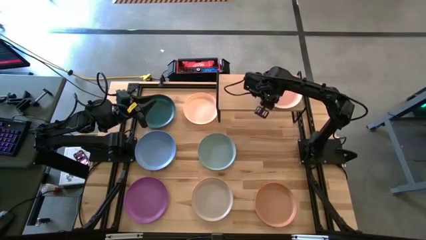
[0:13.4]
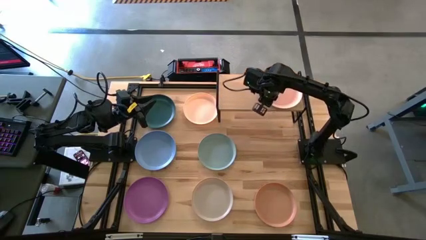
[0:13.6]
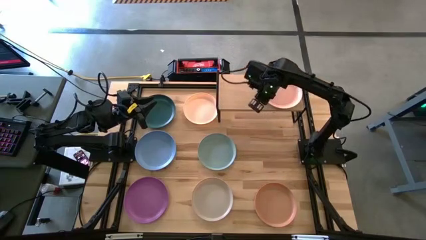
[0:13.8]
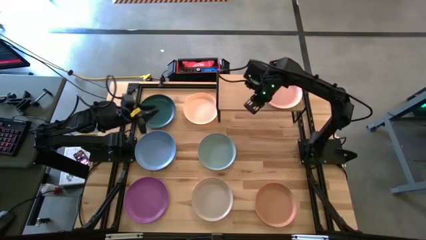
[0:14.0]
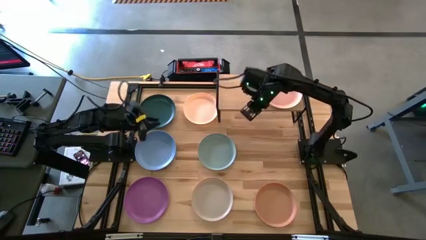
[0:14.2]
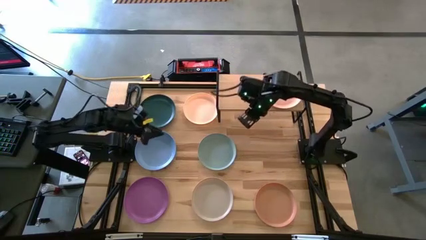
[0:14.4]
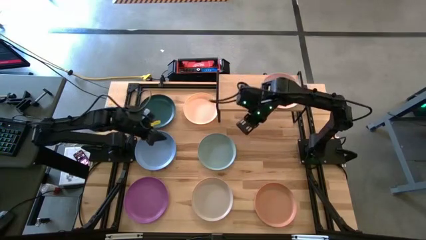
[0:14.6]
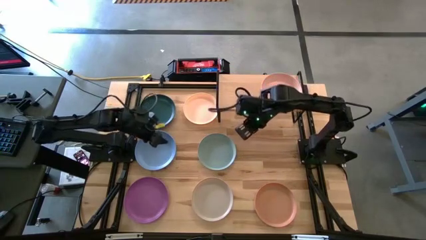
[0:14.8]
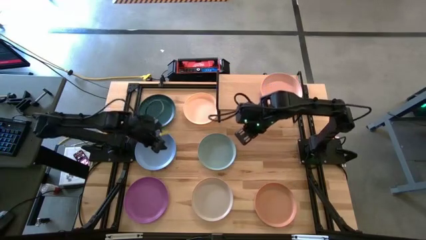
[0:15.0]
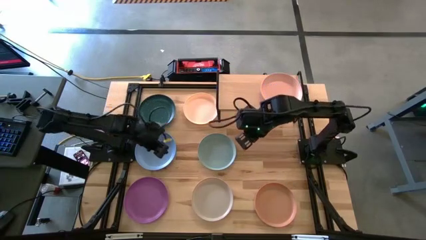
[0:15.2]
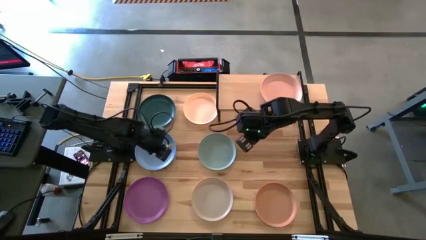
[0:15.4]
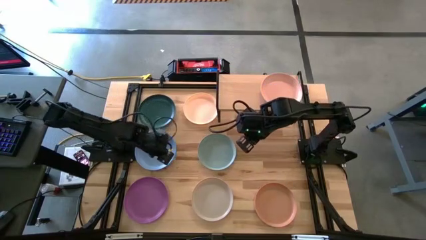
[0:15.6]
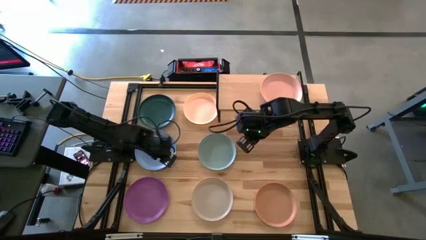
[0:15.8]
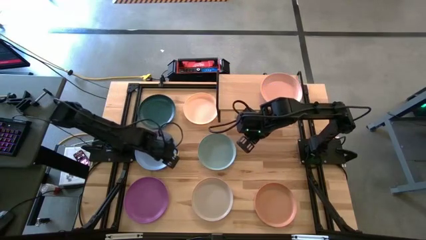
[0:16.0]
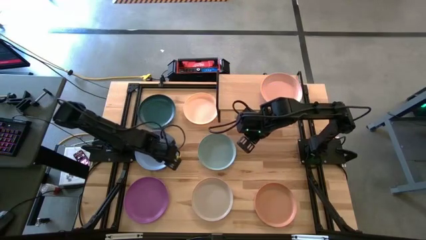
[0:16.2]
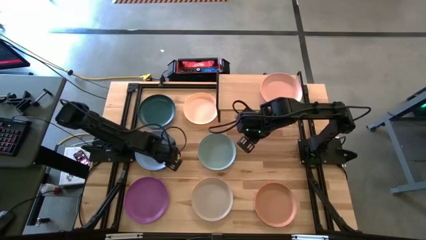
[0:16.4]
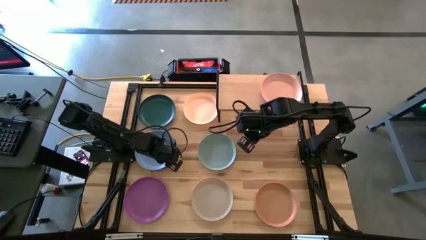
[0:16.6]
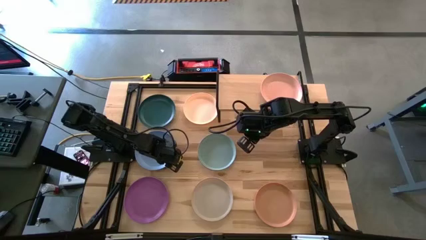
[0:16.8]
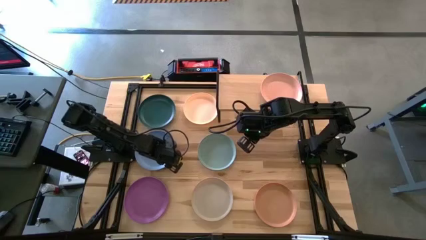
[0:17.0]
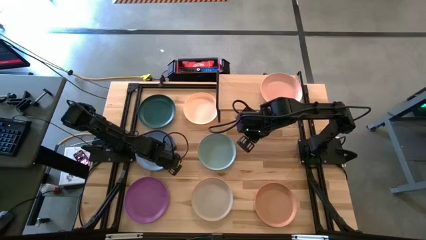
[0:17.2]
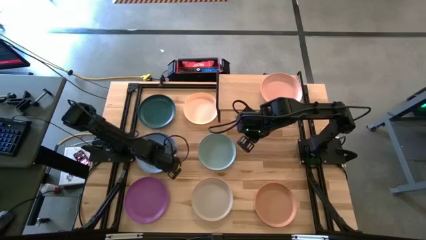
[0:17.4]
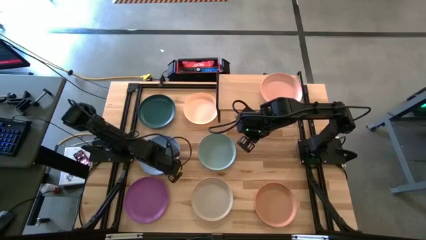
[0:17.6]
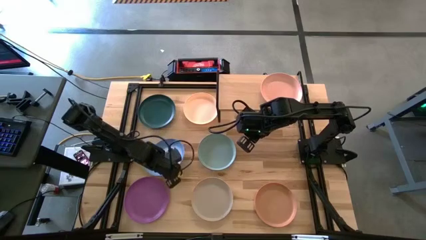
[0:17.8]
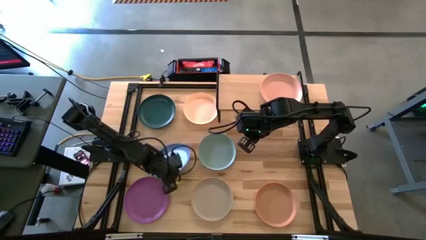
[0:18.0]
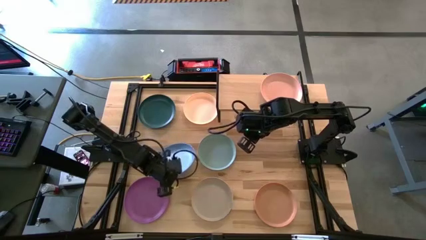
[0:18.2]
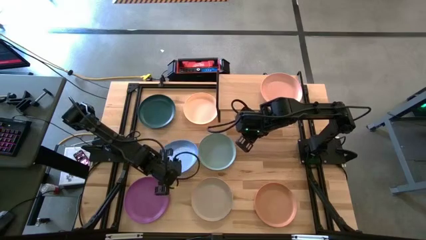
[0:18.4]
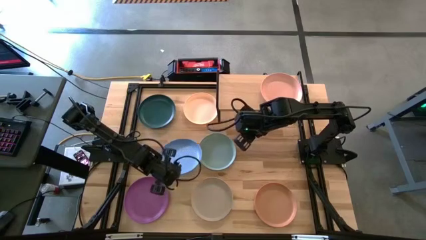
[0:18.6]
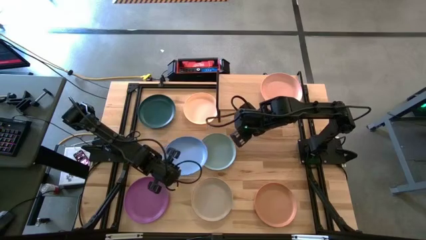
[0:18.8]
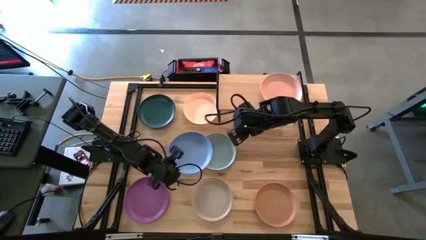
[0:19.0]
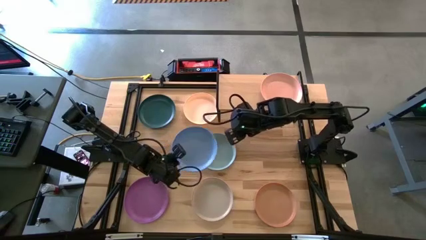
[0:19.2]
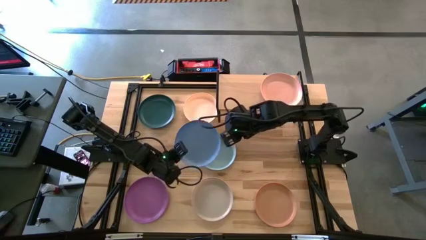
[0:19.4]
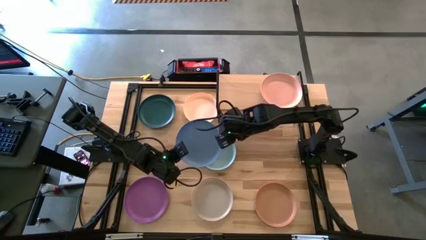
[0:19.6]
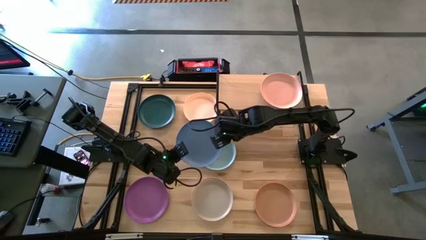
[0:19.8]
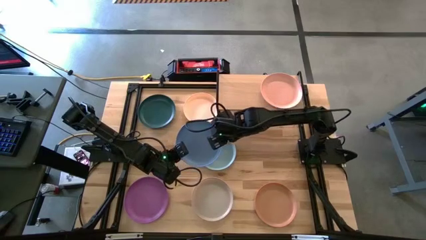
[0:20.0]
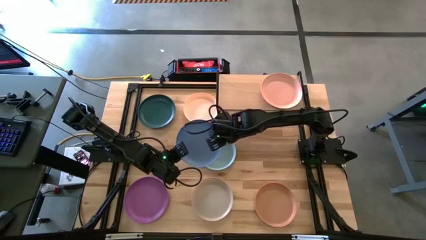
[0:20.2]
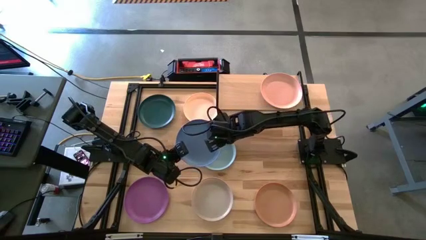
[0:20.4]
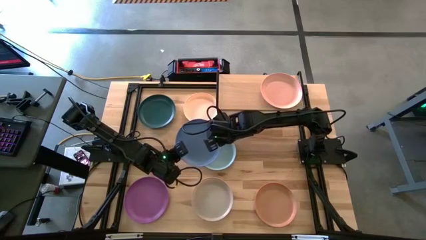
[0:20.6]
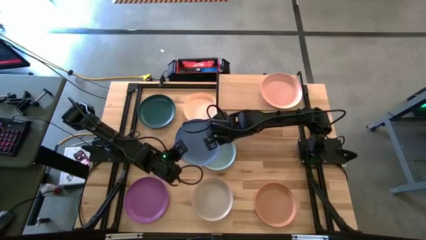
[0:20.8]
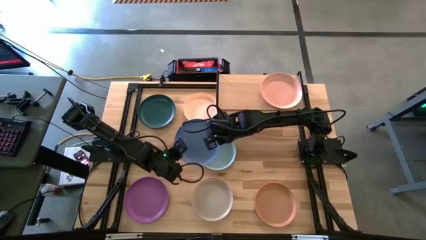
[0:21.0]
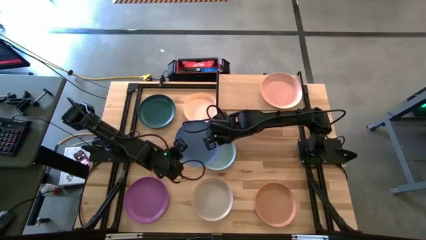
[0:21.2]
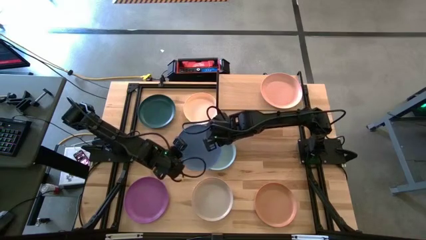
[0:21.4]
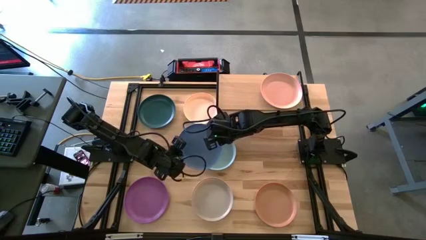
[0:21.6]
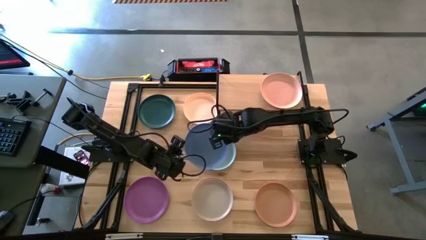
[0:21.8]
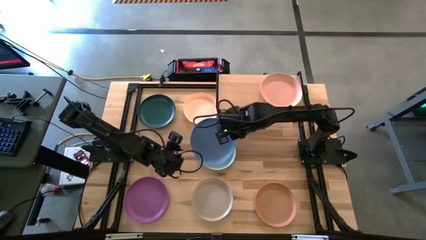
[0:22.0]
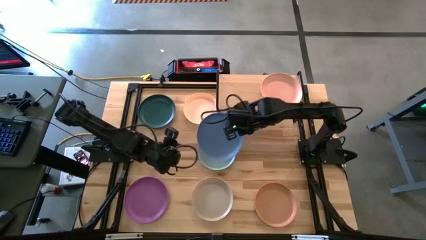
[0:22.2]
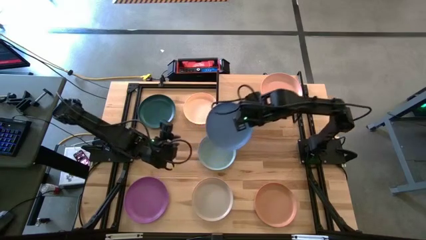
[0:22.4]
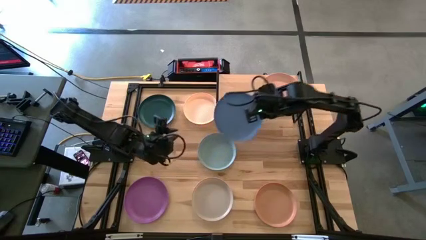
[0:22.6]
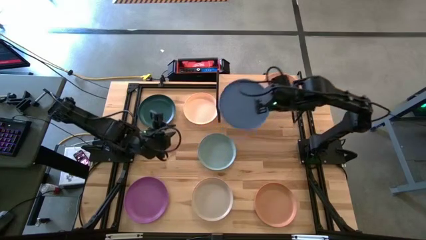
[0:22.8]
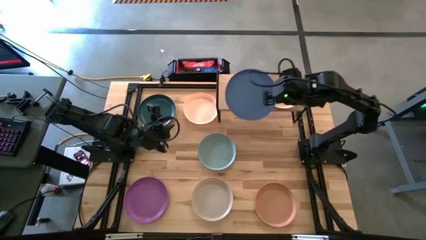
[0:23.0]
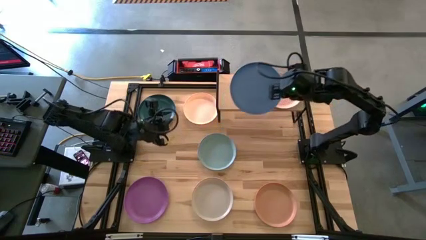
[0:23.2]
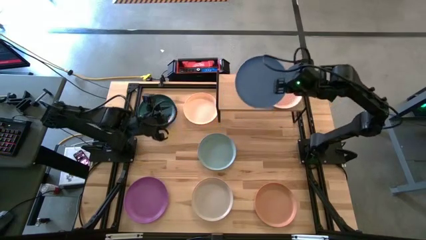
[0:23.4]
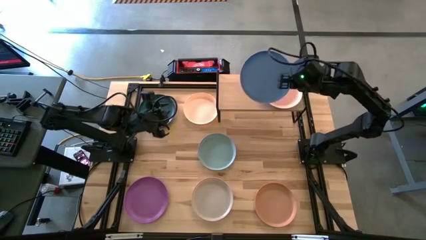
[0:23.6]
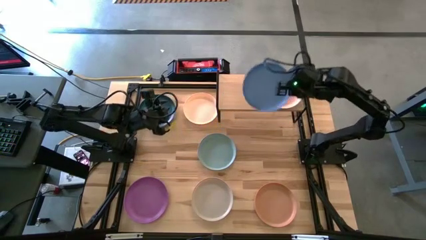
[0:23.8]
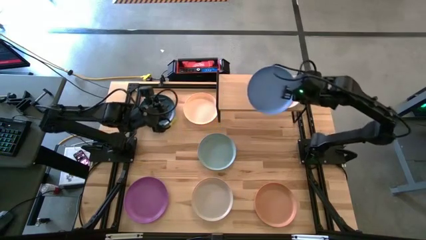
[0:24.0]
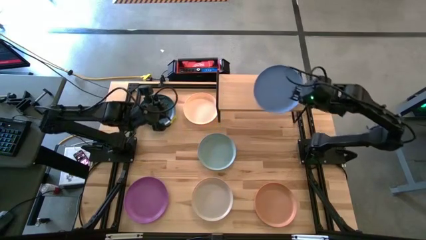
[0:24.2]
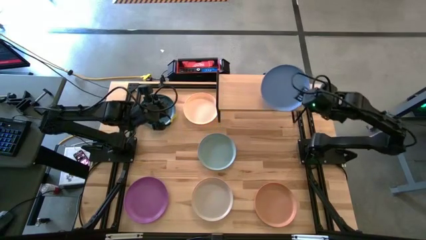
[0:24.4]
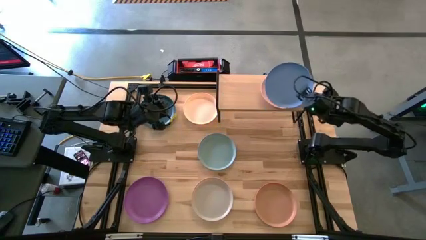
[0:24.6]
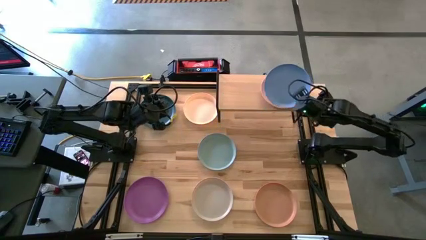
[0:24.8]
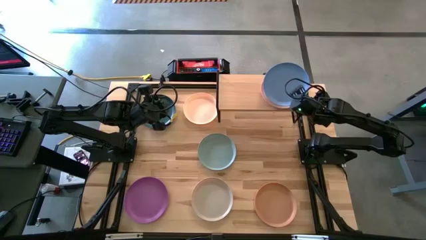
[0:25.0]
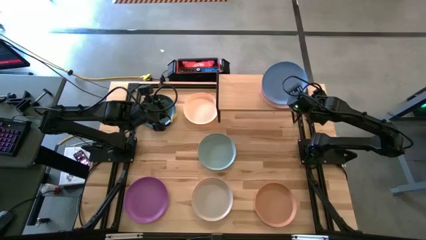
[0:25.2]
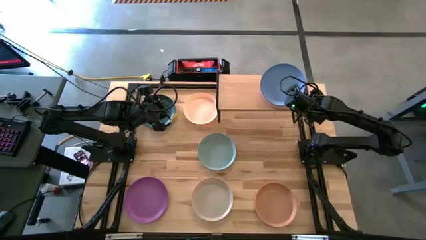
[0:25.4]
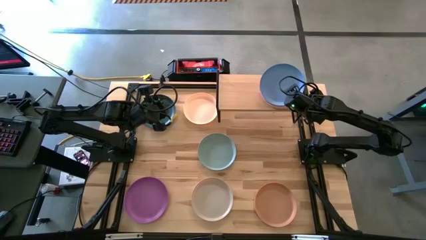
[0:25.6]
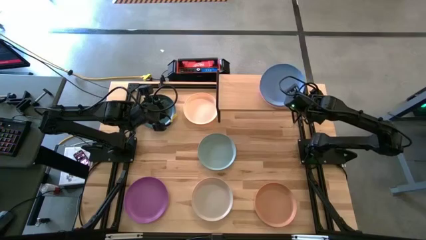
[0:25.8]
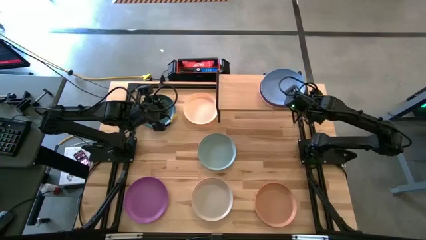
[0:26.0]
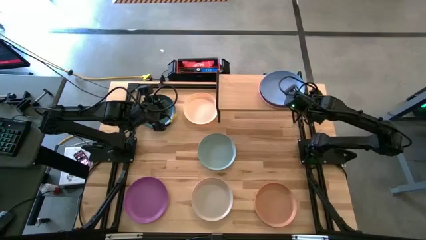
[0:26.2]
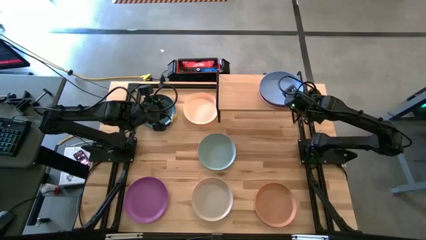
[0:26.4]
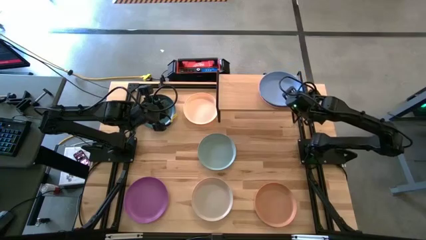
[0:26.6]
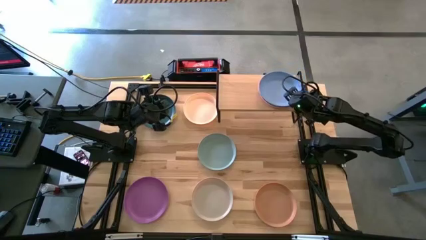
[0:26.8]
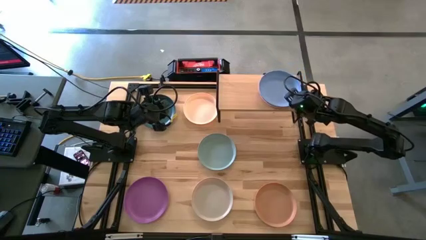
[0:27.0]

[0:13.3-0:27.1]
Task: Place and stack plates onto a shelf
Stack the blue plate on top of the pink plate on the shelf

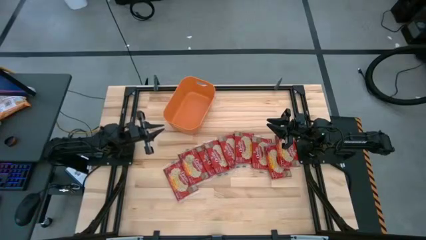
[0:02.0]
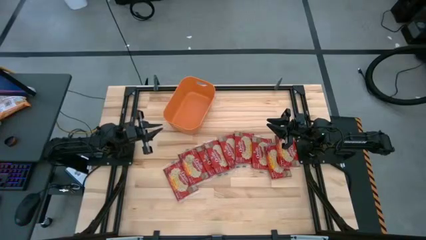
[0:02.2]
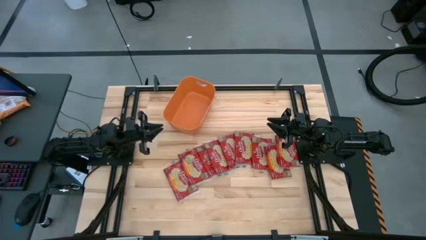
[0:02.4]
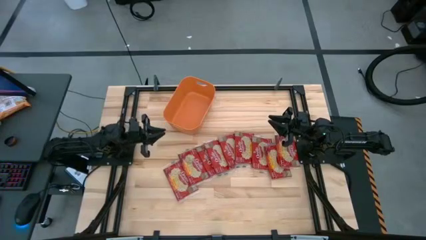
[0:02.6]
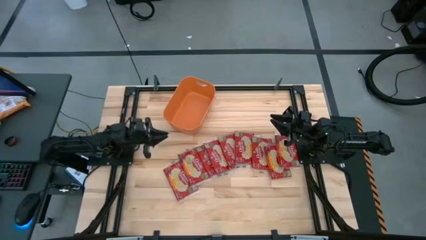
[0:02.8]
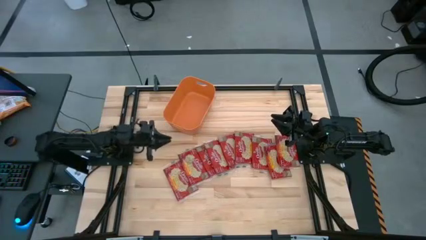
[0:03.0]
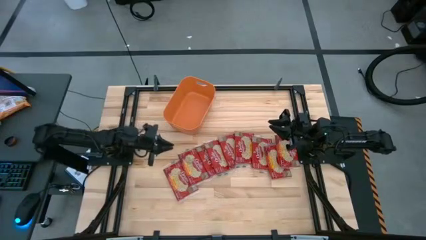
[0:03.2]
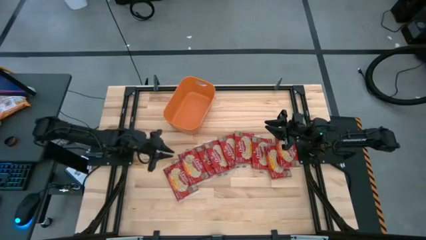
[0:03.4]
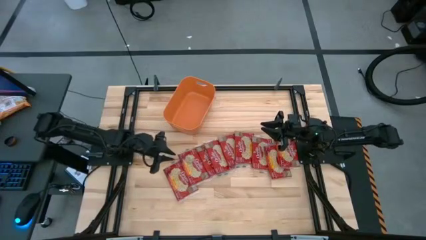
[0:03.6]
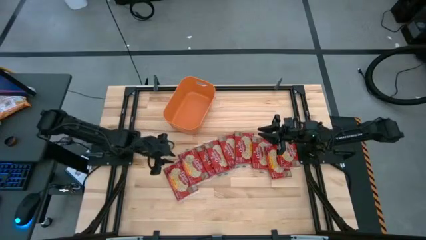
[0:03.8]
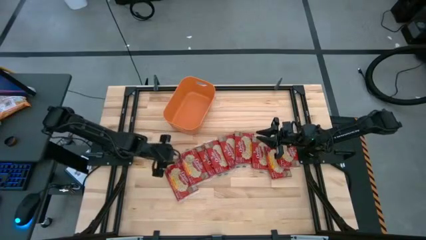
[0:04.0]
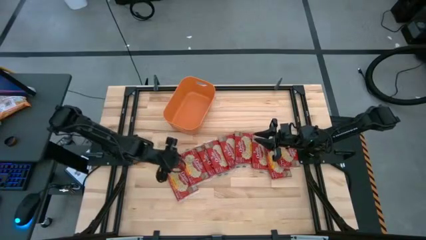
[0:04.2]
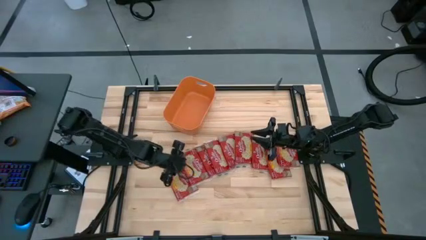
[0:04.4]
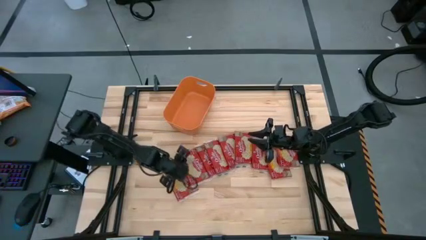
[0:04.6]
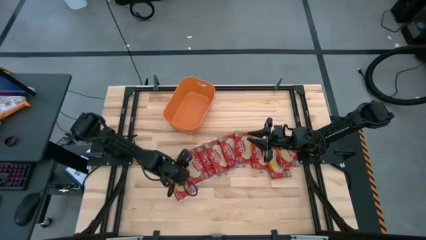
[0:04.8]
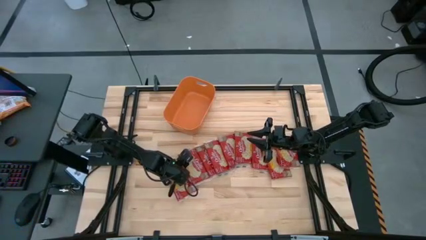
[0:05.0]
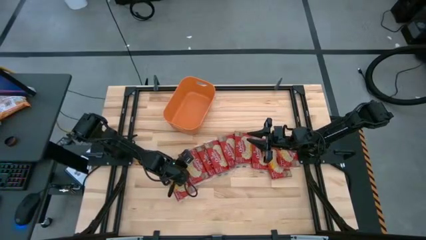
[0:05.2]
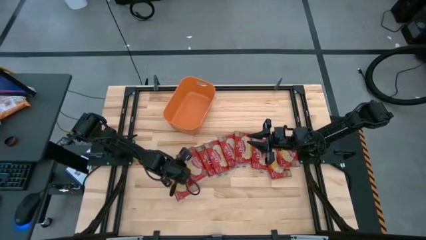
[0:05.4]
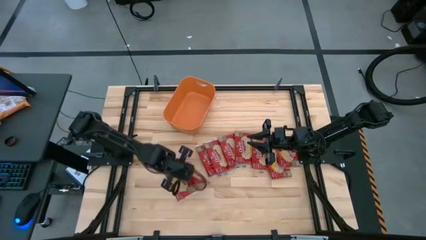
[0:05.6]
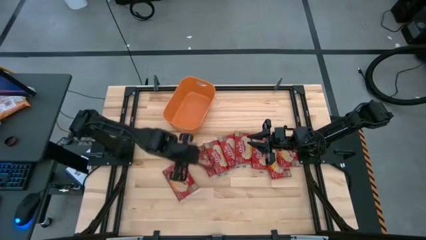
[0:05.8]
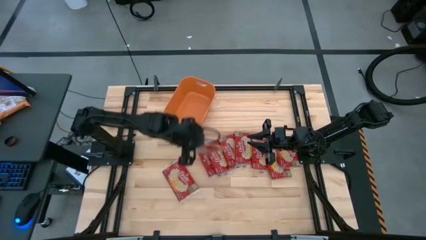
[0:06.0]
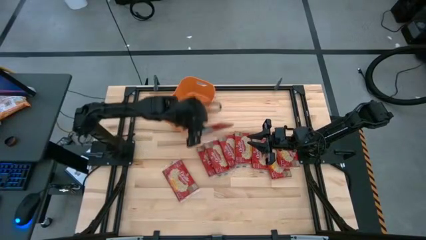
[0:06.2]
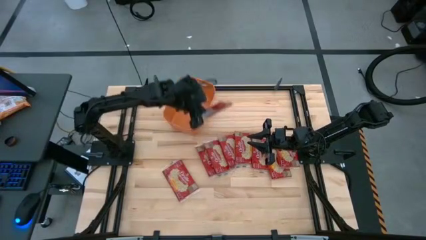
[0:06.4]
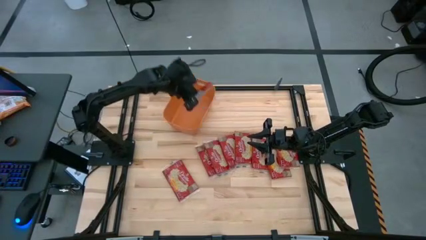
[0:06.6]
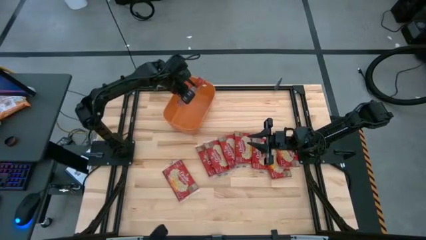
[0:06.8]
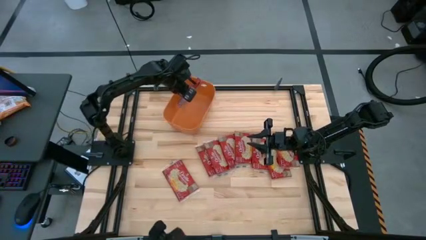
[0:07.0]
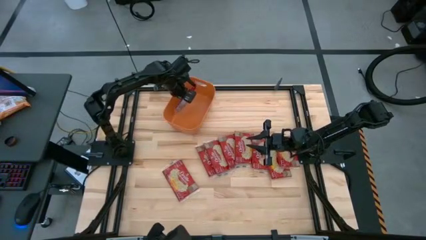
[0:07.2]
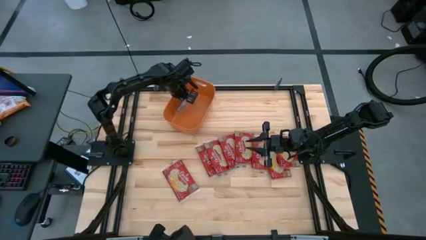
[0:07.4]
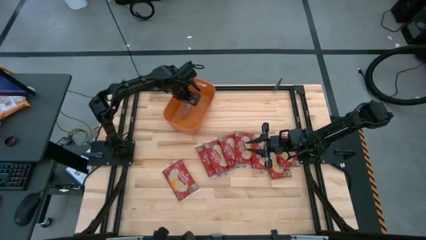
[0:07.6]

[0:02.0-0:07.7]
Task: Sort popcorn bags into baskets
Put the red popcorn bag into the orange bin
